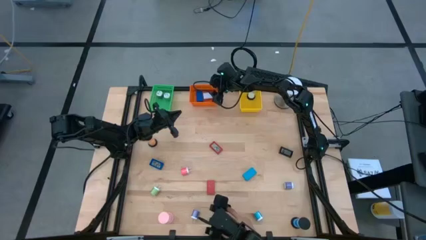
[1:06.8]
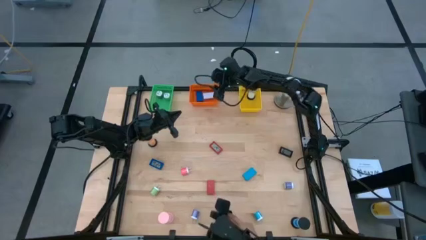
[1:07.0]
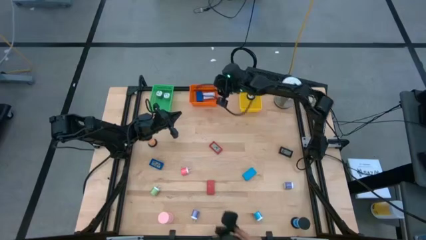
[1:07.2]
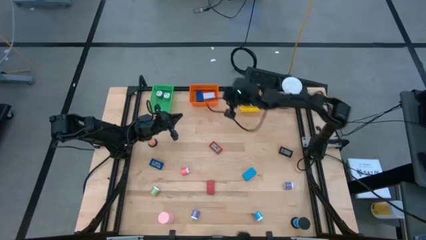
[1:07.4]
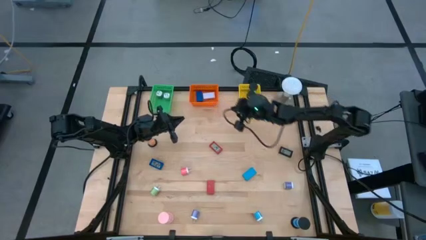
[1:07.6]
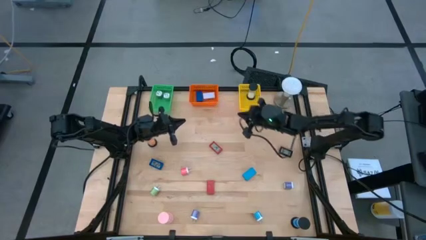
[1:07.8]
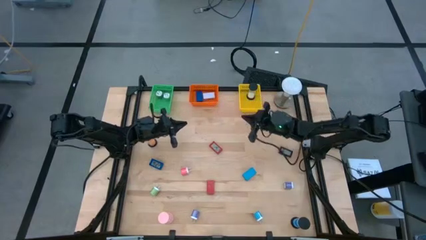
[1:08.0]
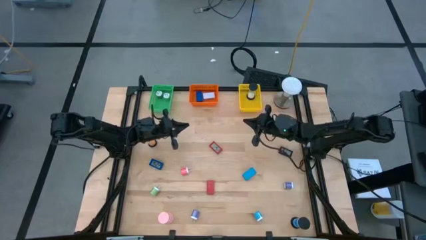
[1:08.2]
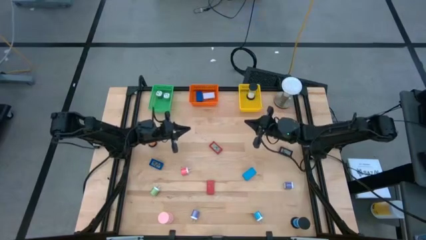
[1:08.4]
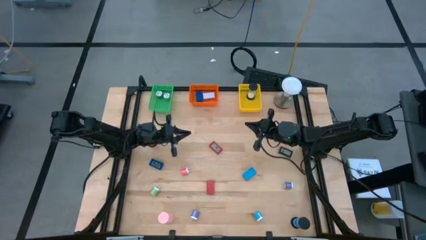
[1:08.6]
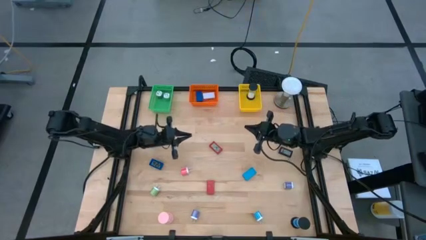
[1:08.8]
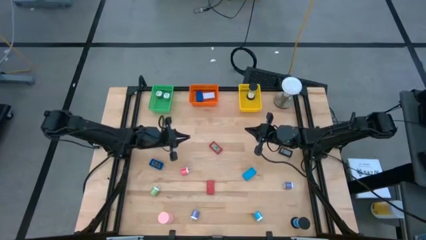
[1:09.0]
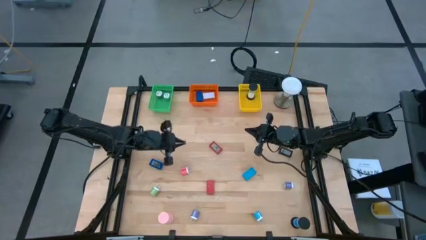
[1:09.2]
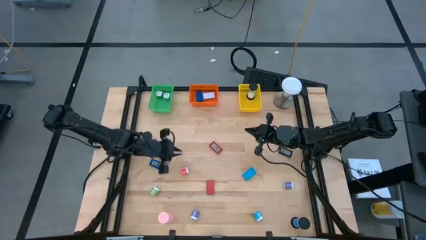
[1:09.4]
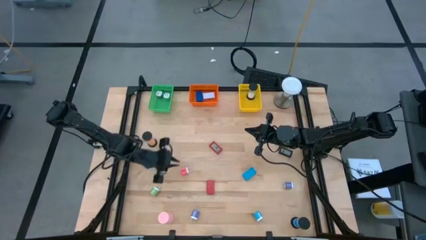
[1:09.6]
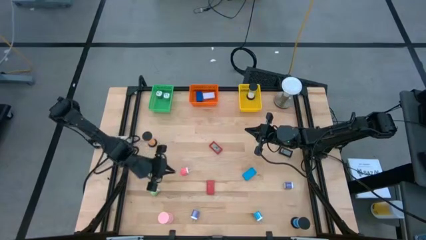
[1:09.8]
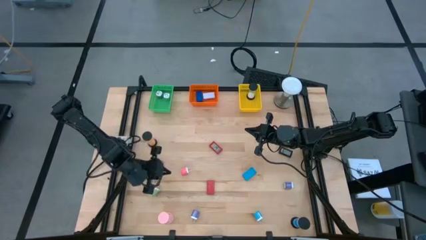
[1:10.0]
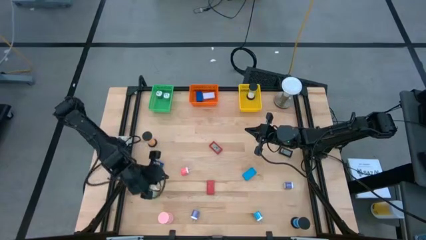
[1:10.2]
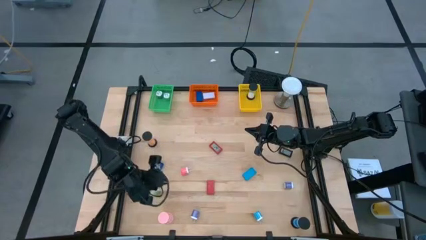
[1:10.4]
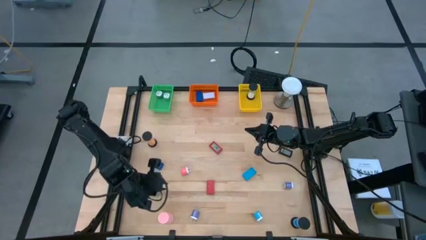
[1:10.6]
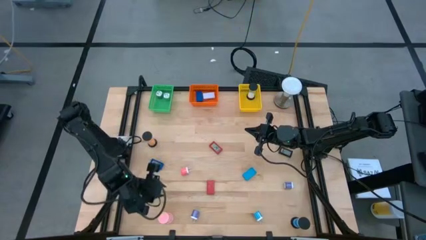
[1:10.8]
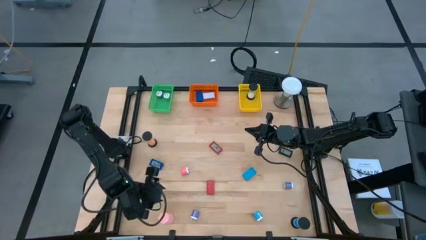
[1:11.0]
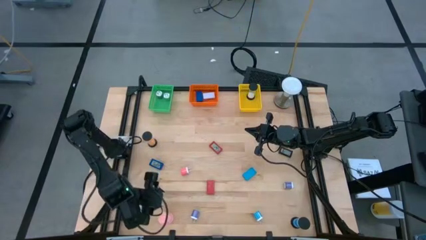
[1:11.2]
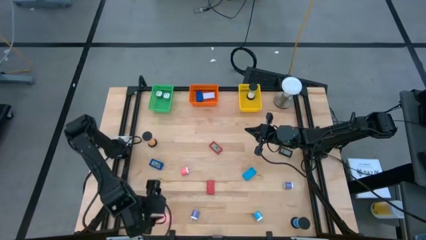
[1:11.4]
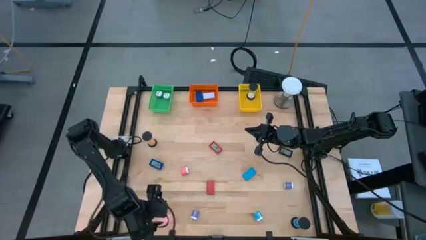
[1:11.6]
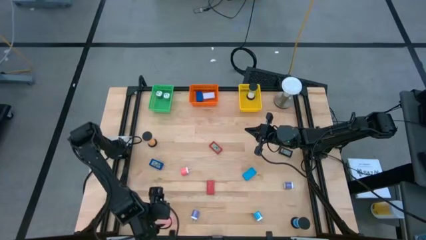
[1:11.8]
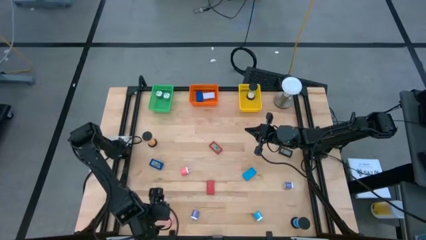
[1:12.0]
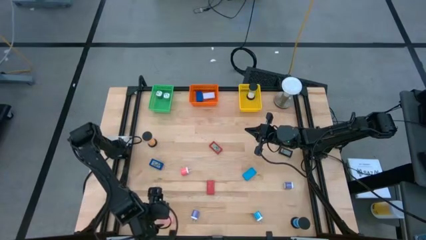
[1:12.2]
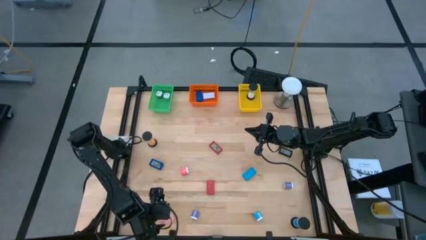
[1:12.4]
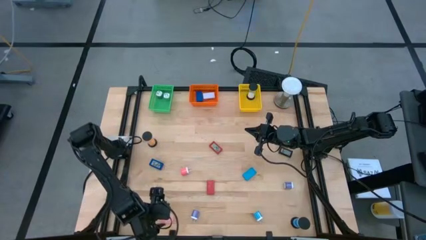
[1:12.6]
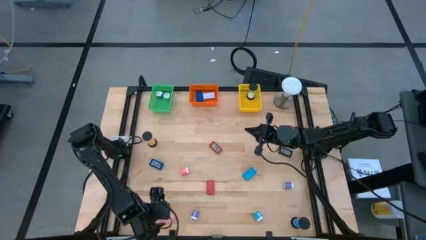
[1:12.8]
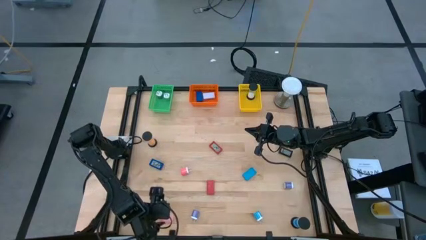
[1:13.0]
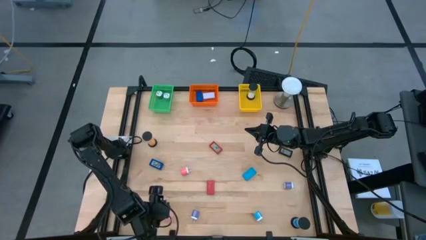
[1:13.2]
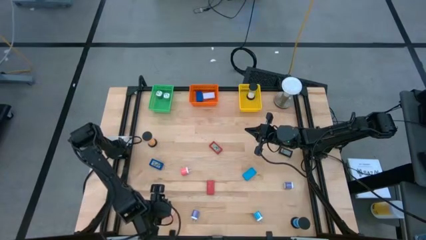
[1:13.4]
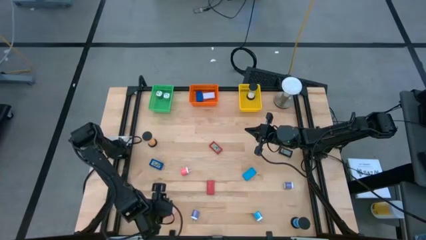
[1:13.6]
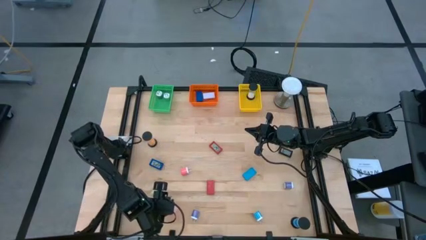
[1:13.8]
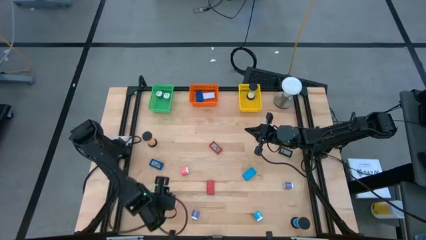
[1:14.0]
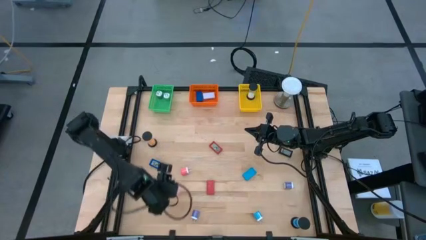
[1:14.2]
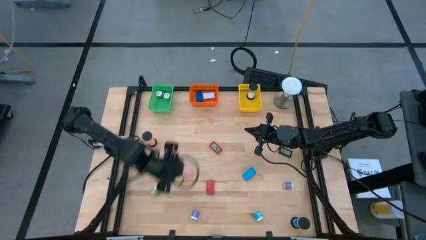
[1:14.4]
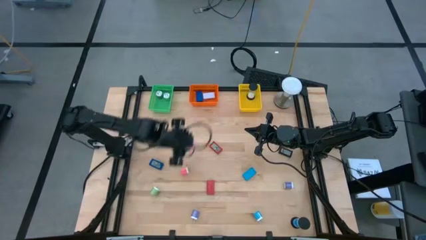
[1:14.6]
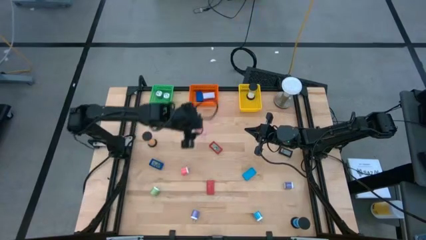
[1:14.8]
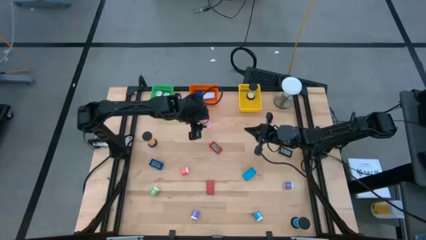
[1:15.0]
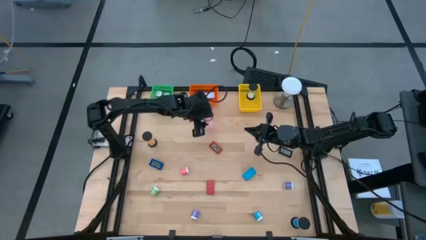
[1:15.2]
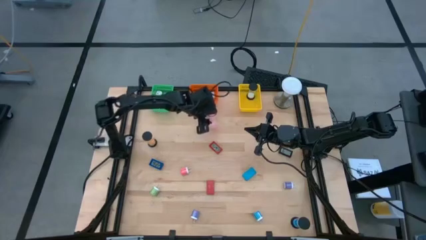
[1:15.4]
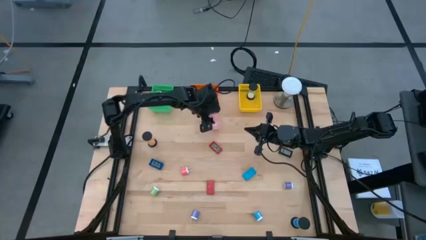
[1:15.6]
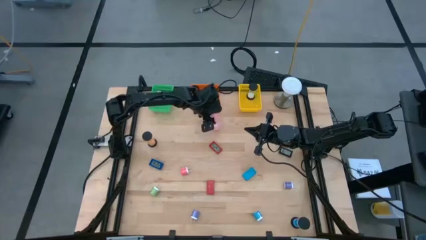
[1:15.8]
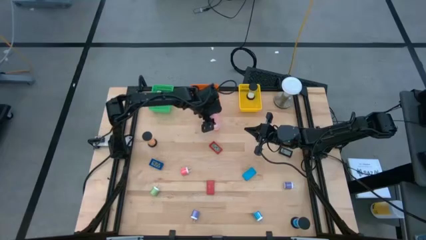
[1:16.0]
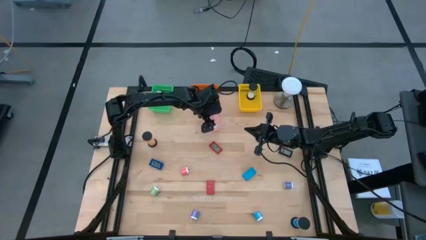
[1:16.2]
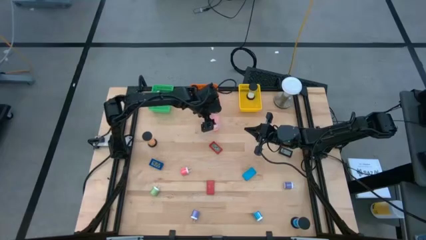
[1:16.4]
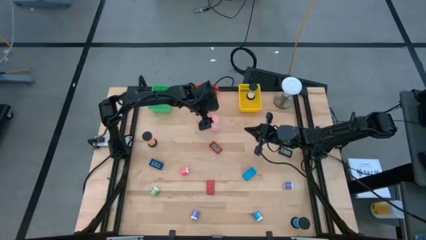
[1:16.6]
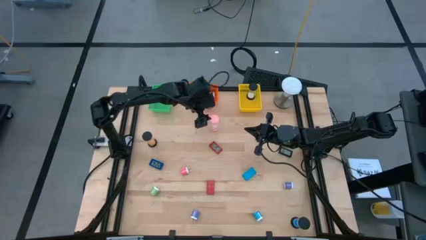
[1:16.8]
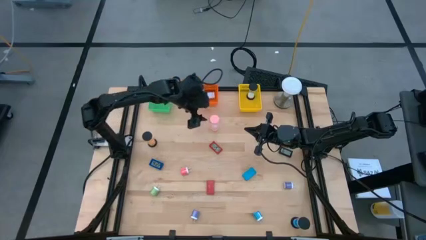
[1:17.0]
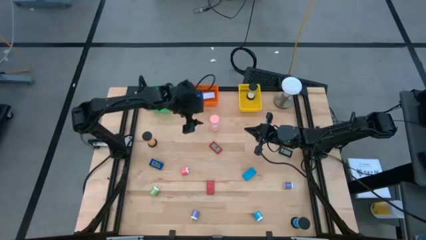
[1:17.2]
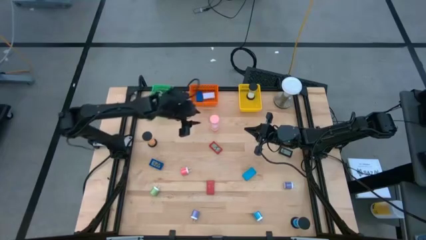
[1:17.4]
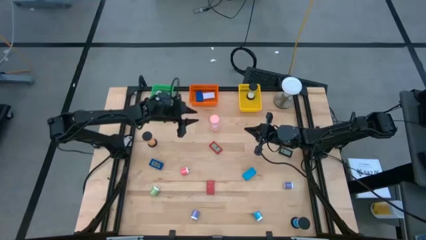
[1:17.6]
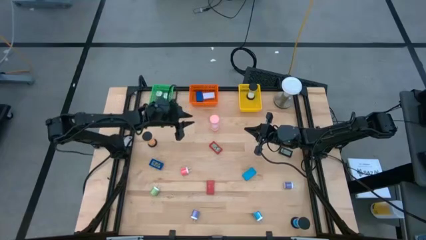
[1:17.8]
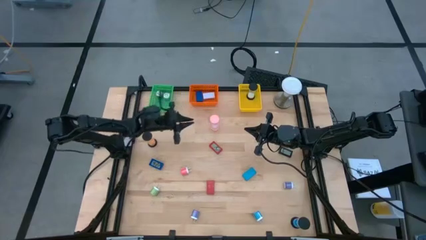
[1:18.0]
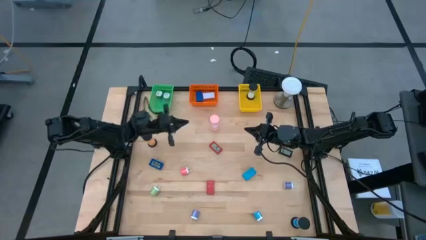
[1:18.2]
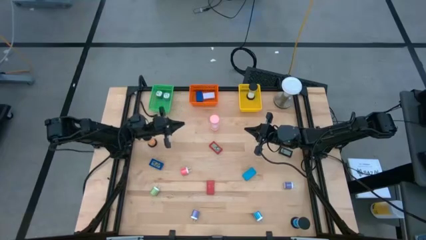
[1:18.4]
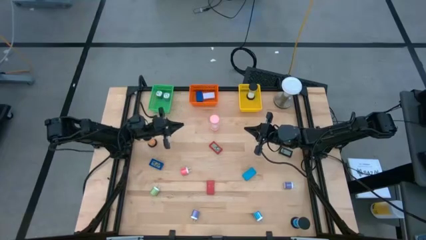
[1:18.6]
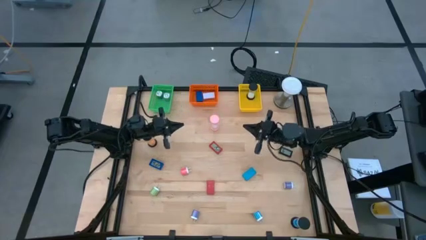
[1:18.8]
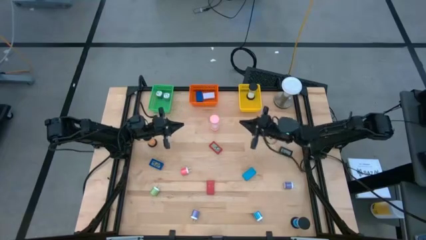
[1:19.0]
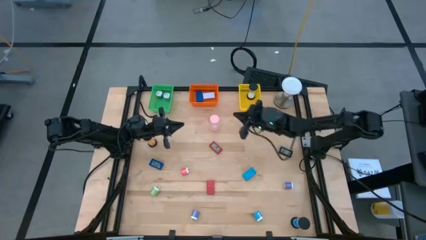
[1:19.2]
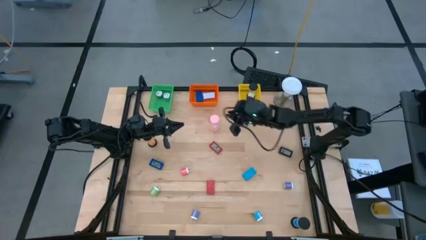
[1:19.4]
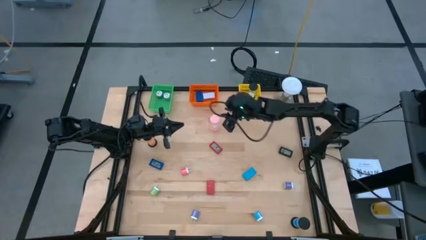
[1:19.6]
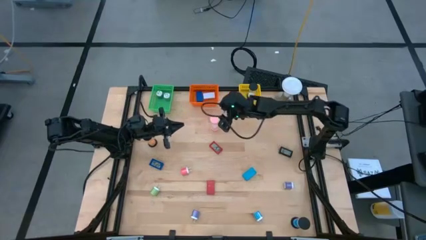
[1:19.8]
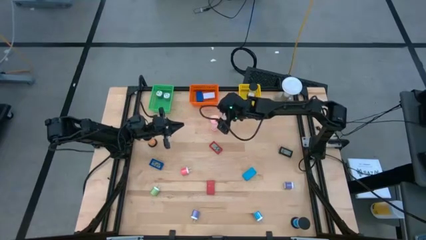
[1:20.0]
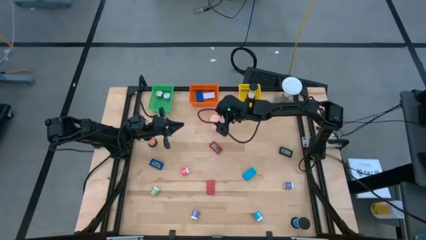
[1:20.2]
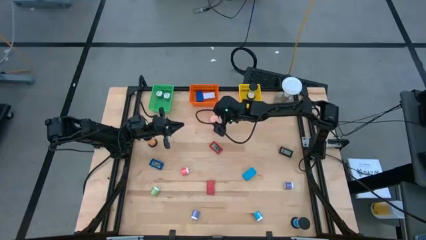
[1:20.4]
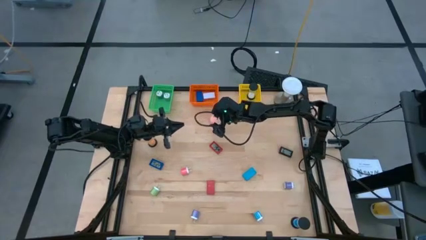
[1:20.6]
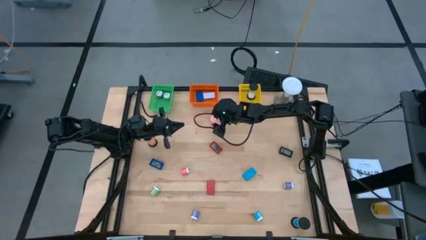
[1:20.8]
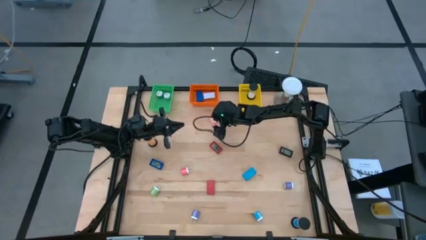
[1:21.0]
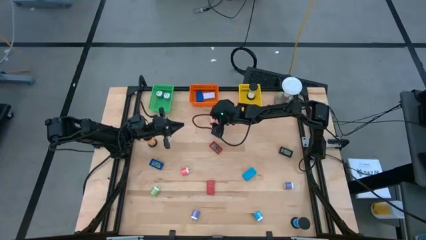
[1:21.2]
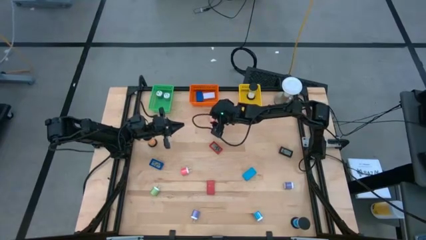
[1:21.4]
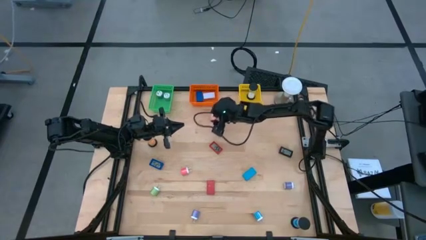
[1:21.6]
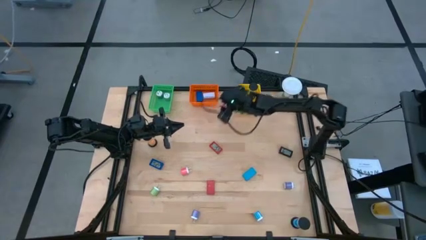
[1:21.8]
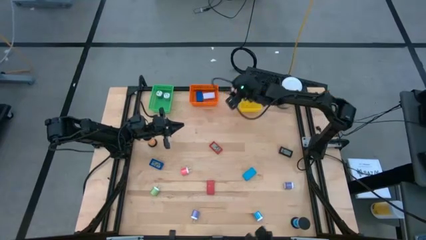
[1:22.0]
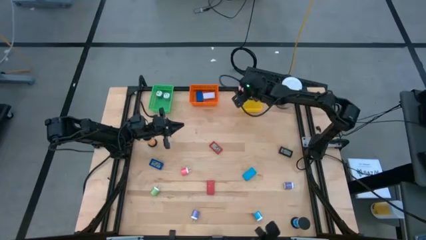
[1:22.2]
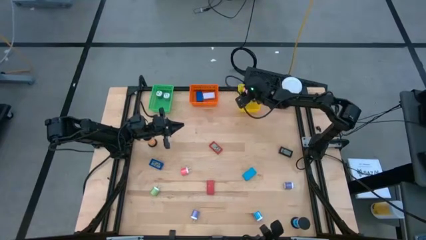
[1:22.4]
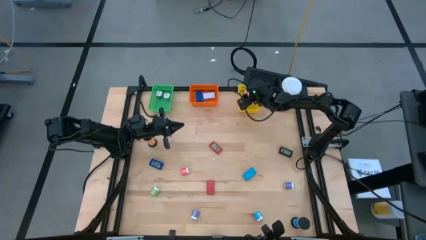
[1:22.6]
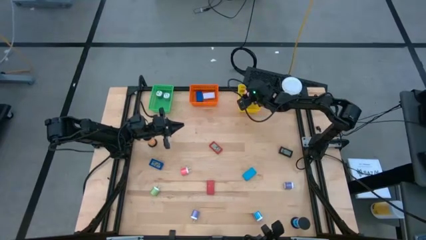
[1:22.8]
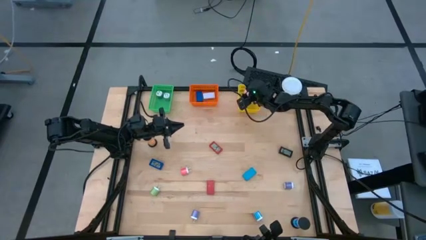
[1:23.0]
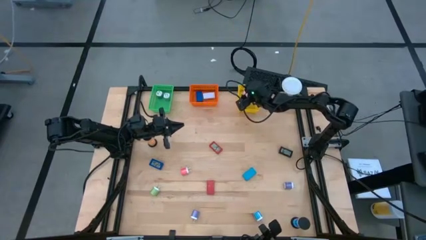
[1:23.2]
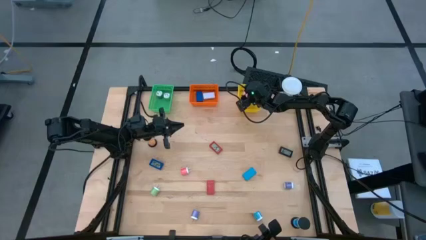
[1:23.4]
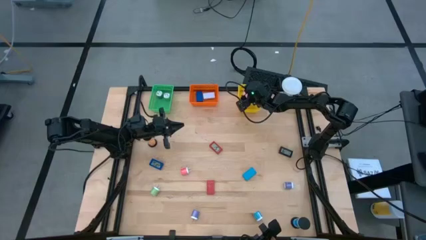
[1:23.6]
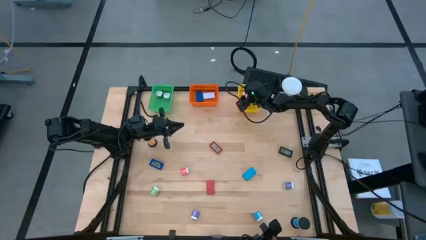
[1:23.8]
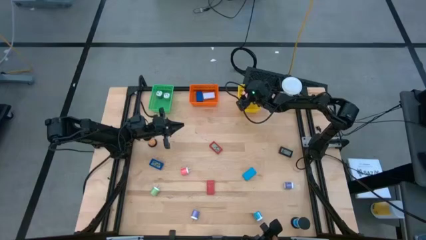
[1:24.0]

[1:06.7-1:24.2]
Task: Pick & Place Office items
Put the pink hourglass into the yellow bin
